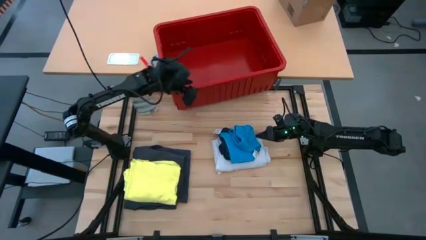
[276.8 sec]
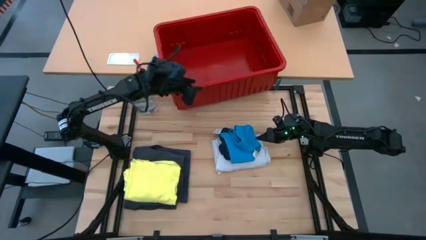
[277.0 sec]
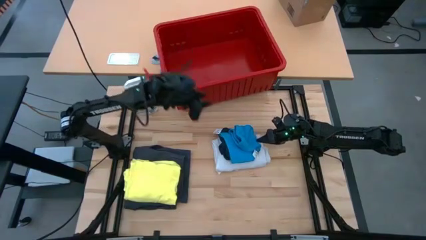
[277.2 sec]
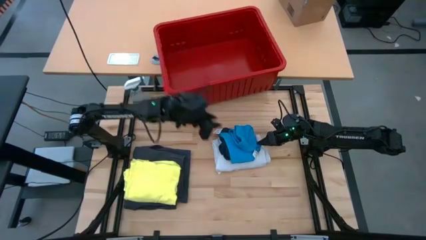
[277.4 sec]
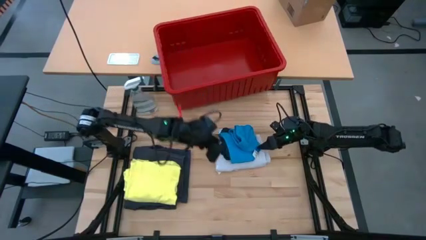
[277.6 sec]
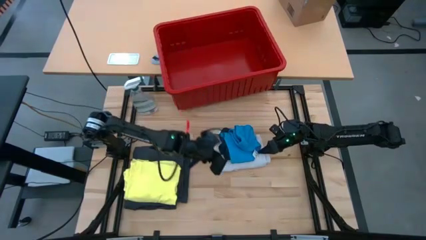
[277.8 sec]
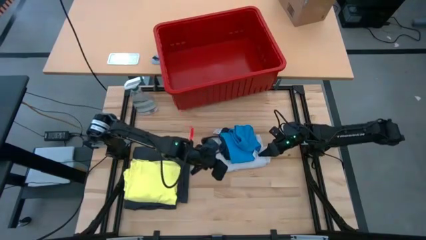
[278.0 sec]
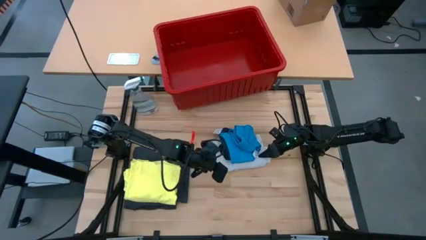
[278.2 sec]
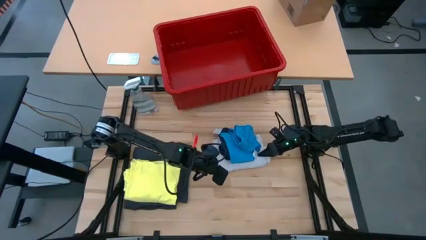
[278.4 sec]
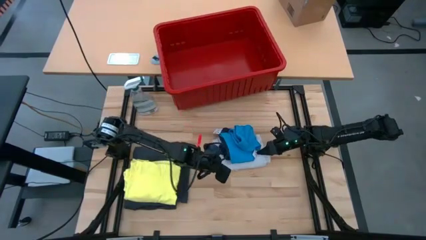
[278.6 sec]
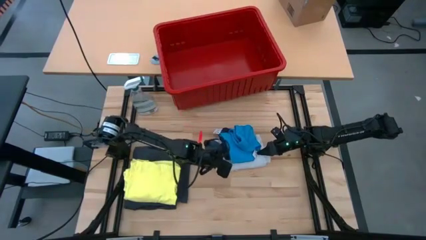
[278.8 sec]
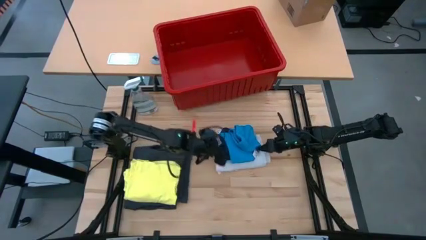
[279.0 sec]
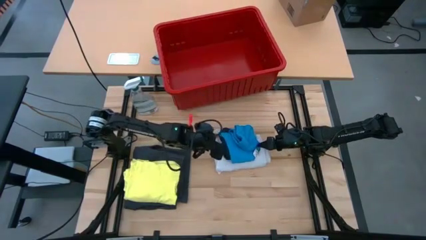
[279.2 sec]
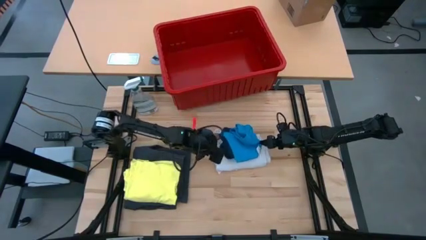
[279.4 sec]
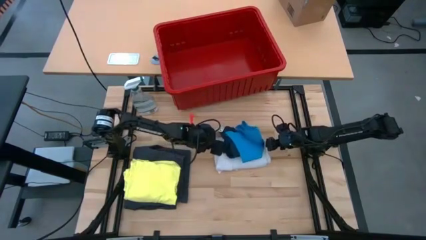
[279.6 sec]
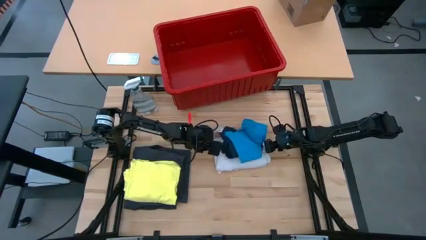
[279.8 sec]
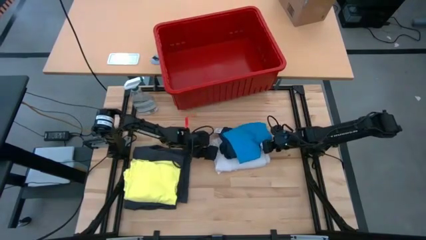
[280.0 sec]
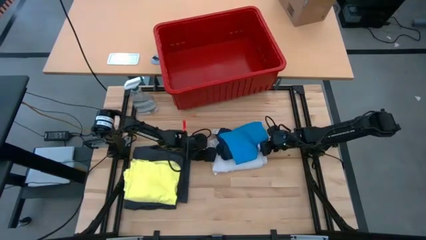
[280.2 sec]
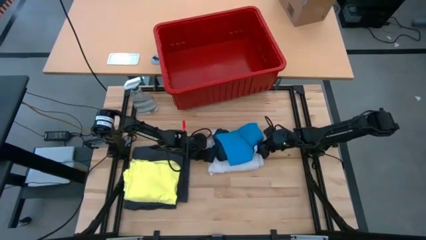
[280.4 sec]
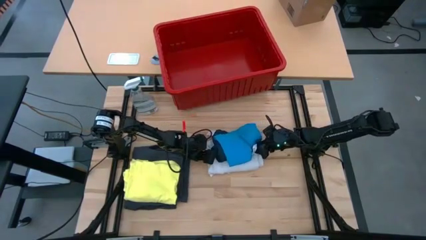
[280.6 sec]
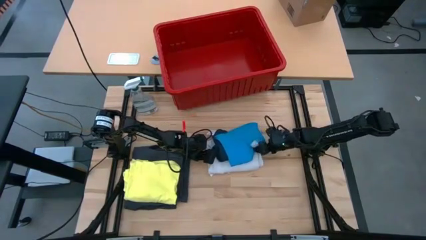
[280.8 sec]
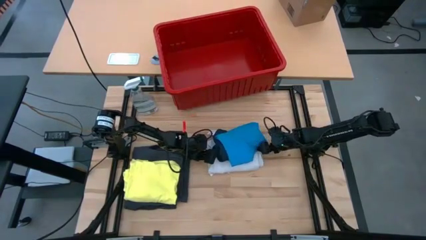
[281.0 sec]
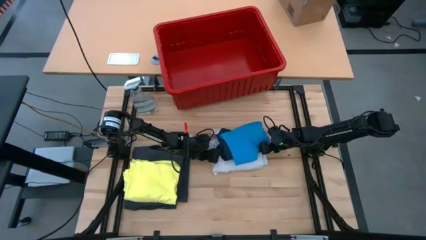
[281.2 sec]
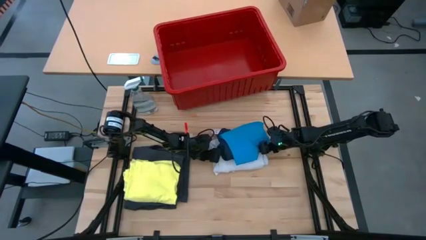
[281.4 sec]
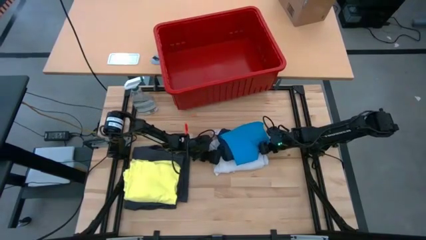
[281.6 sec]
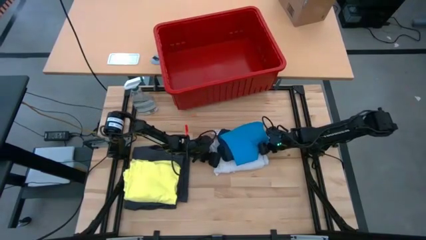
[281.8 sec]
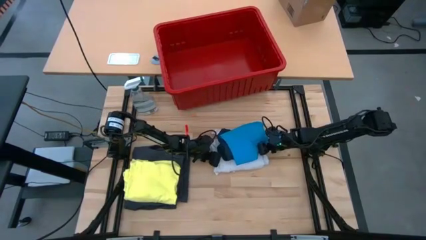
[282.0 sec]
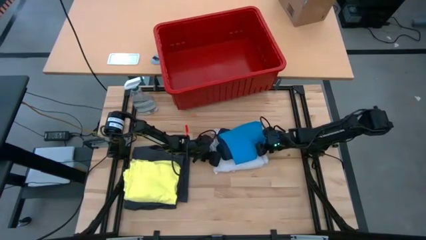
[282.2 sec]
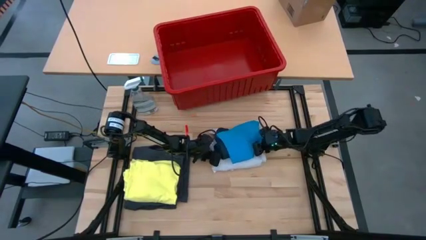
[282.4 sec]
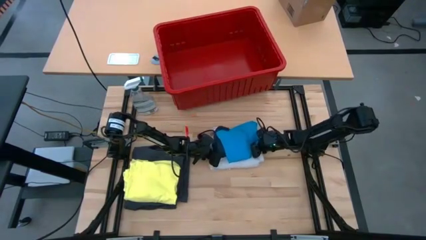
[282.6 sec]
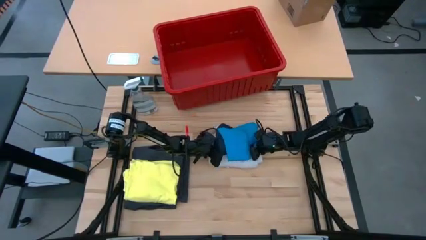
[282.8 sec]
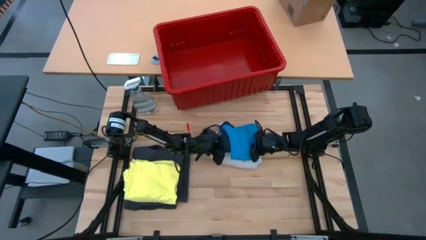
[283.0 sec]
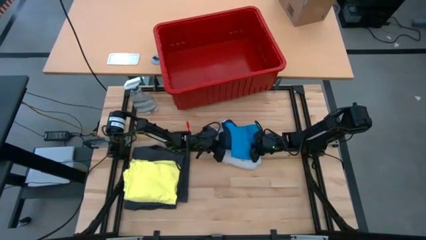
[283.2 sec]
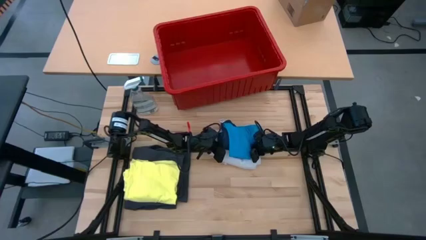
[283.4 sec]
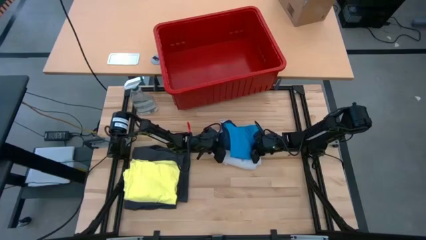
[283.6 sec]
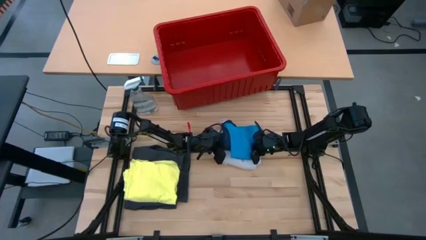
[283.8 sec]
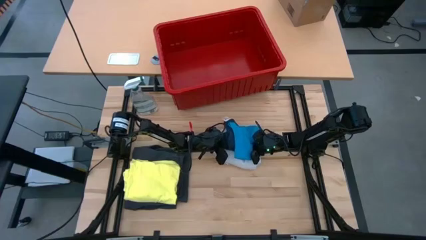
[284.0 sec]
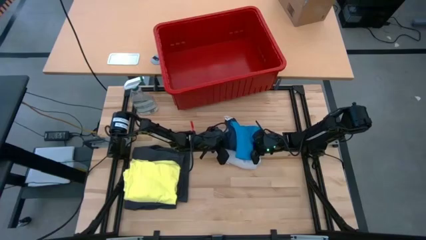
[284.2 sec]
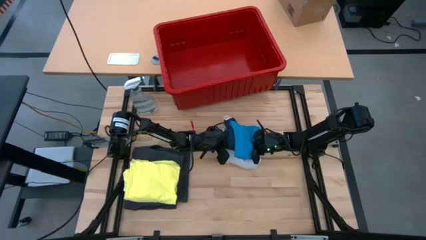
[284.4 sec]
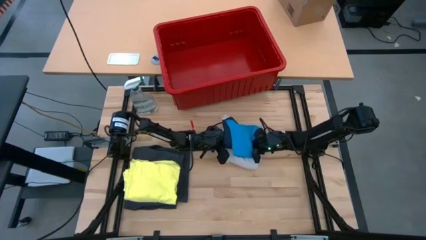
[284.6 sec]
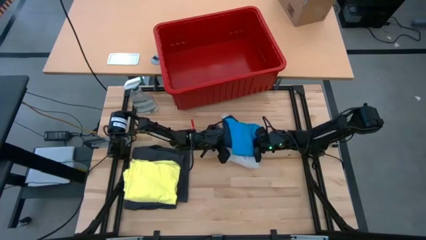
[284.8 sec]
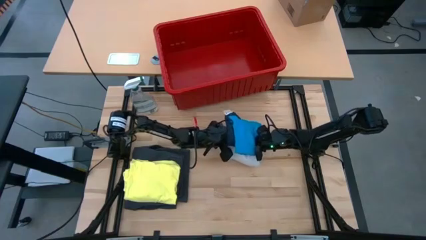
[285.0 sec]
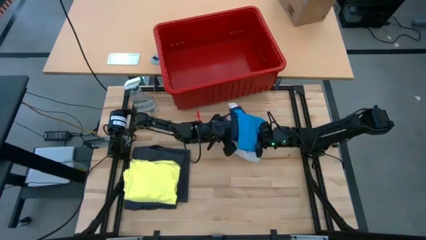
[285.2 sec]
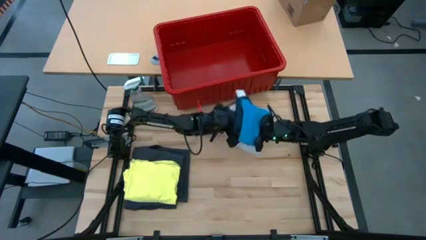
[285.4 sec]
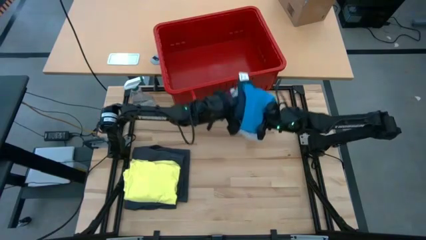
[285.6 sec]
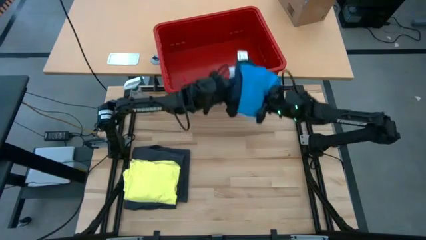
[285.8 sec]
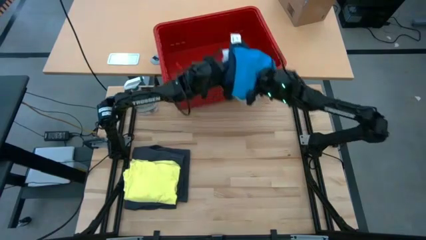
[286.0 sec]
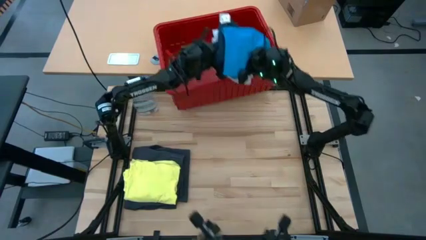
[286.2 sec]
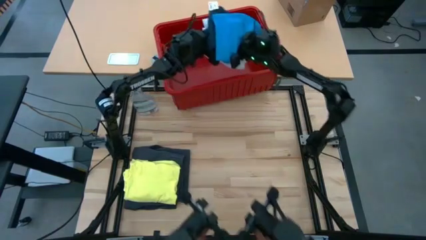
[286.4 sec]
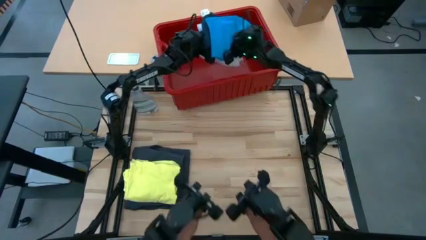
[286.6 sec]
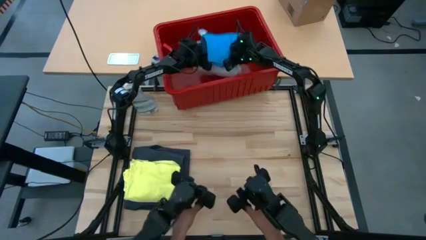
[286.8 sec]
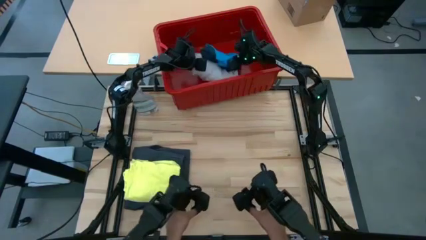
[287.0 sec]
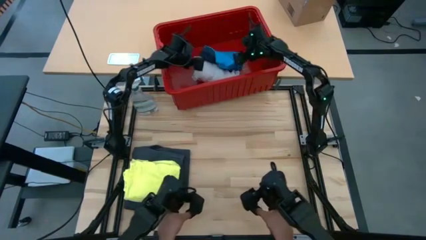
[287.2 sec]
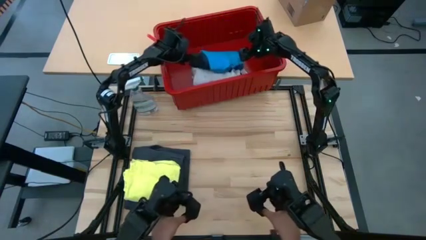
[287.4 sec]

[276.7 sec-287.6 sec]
Task: Fold Laundry from Bin
Put the stacked clothes into the red laundry bin

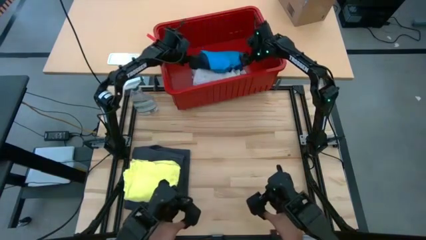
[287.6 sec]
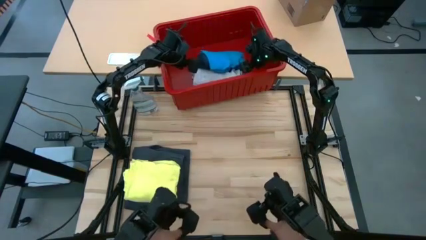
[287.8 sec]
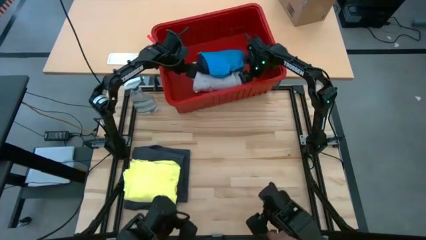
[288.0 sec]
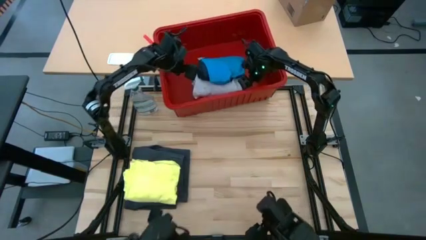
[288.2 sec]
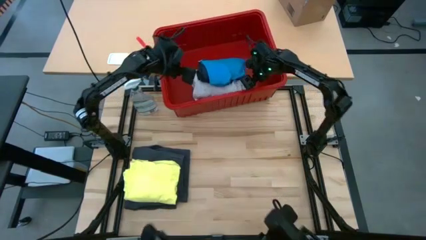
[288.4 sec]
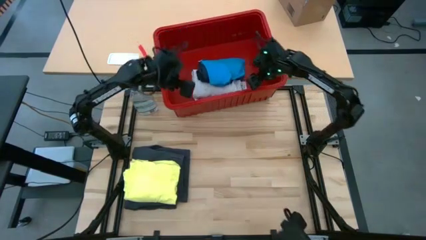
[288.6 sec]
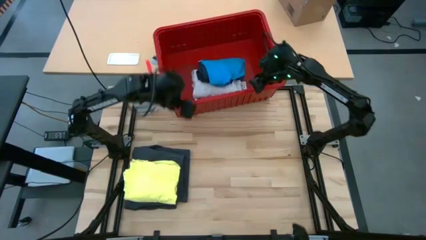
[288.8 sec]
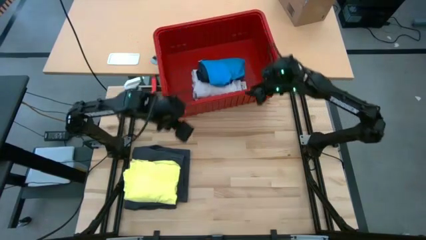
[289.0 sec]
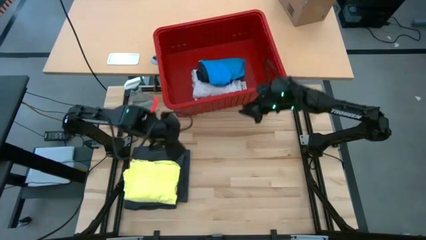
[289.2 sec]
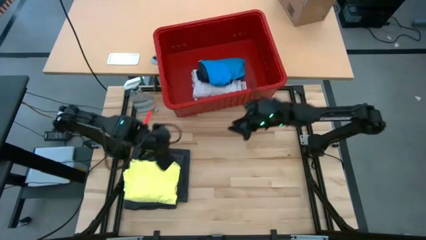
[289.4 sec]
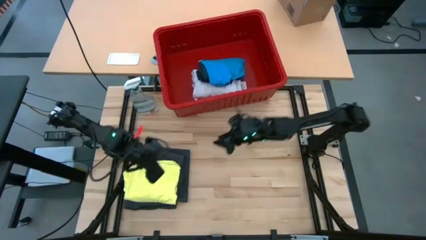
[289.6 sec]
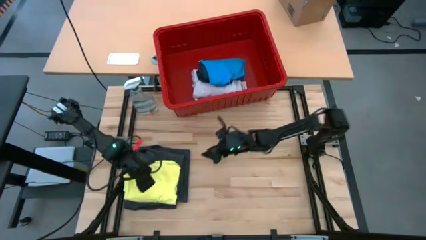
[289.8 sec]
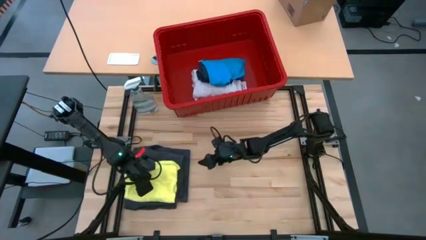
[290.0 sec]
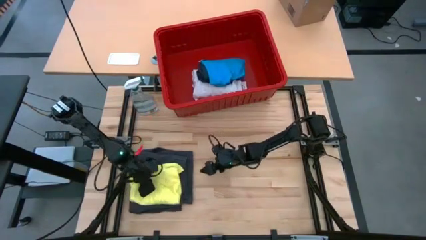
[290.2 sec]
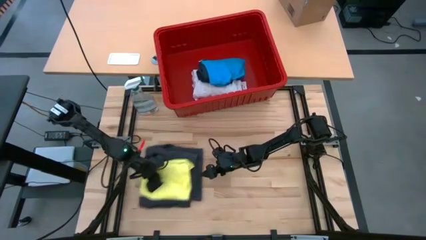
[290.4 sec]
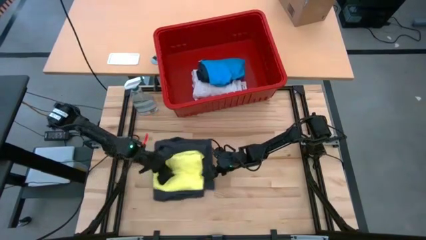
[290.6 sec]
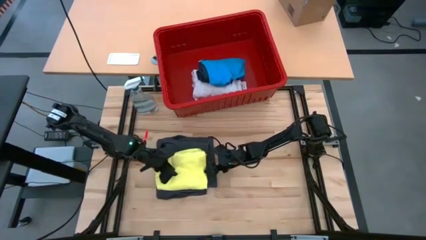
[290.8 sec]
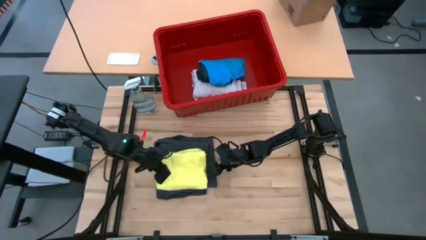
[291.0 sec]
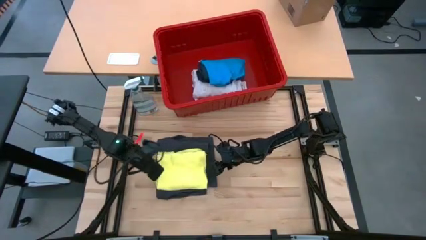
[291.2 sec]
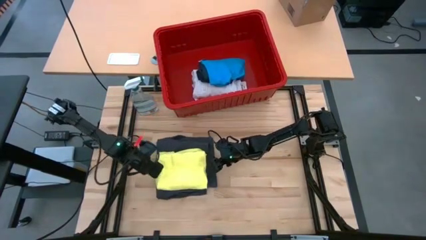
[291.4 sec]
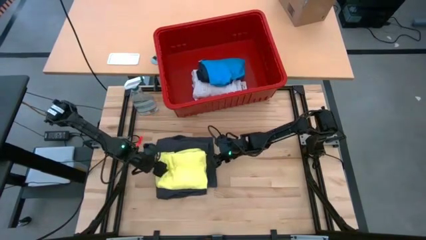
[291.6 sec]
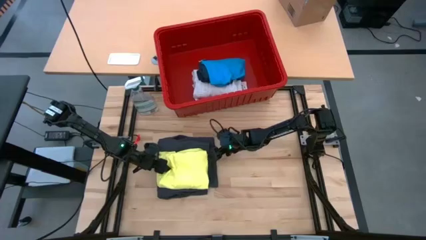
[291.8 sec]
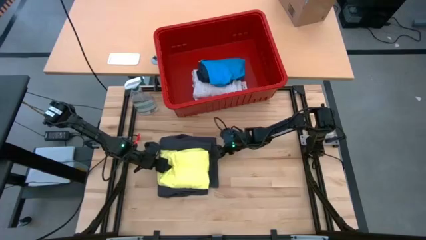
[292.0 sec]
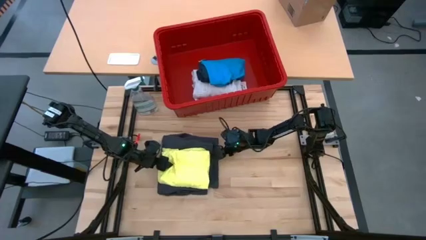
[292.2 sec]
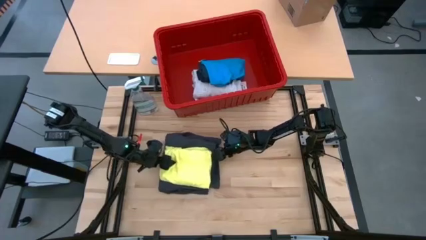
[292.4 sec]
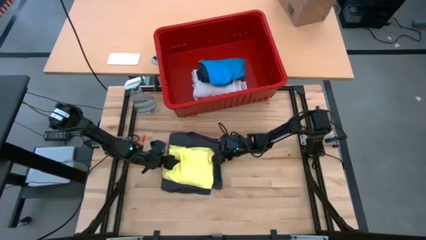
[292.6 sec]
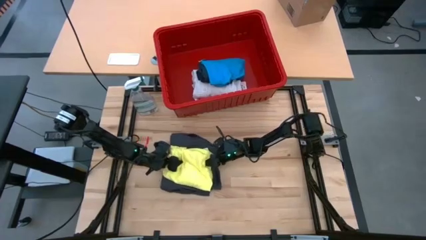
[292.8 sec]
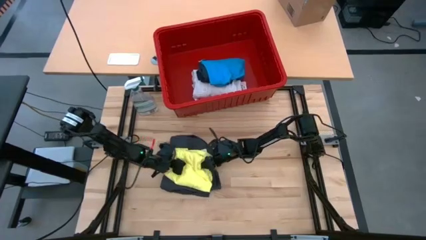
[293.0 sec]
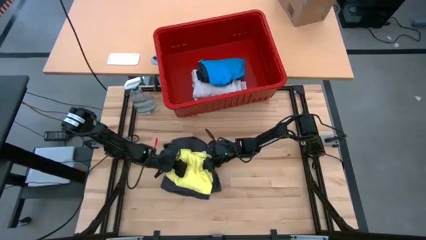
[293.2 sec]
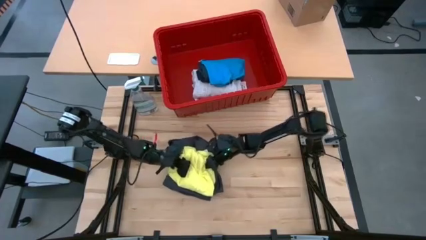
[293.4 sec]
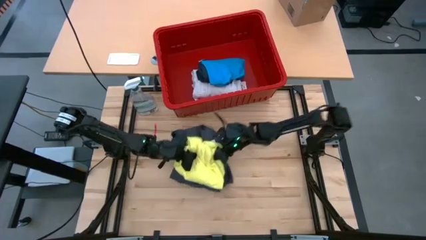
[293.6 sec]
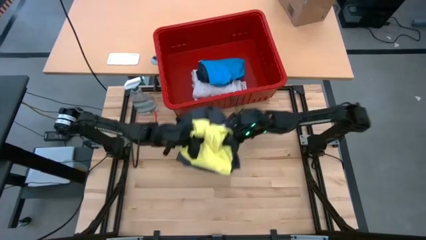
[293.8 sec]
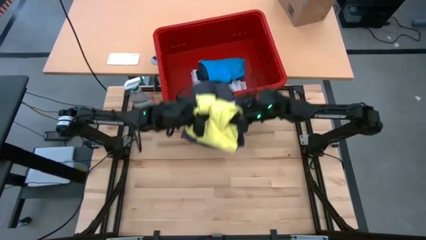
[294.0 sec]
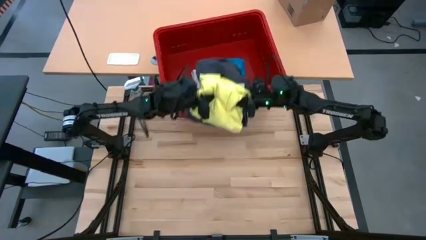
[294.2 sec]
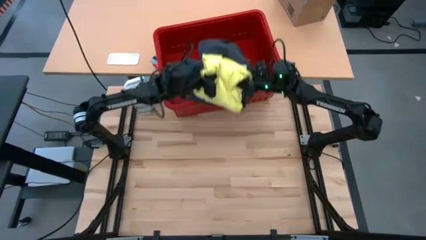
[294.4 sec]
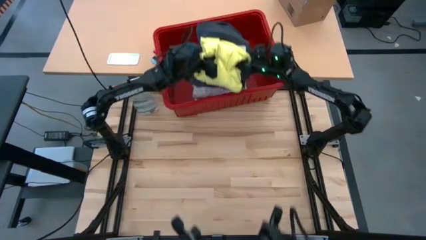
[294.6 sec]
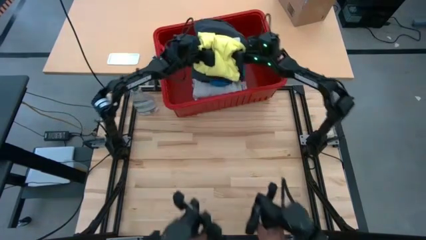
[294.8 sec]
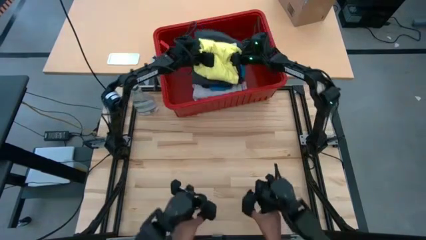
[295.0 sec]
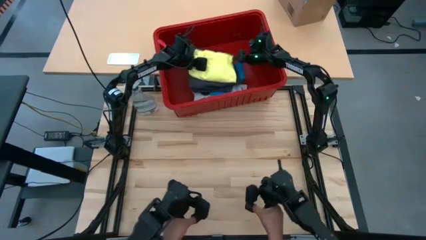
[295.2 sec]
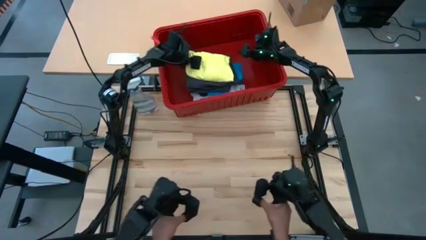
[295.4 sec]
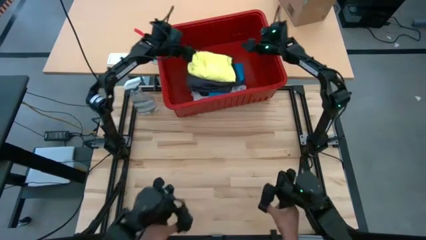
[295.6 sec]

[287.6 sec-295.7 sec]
Put the stacked clothes into the red laundry bin
